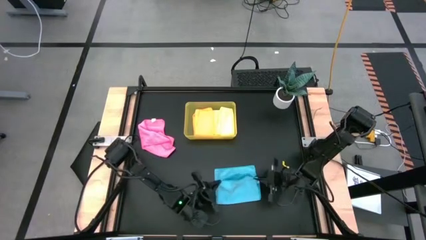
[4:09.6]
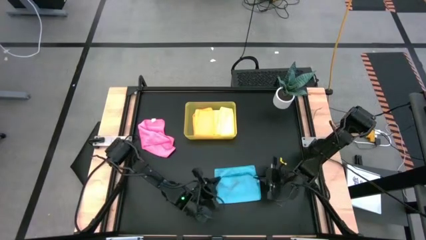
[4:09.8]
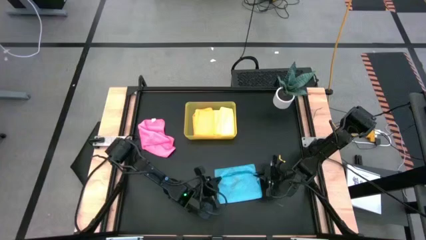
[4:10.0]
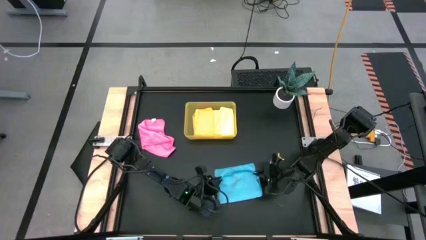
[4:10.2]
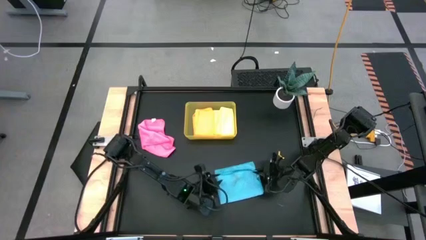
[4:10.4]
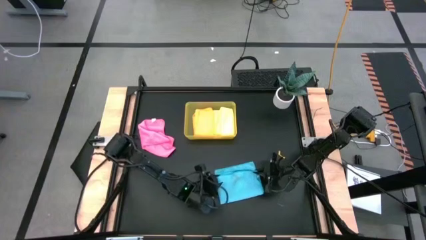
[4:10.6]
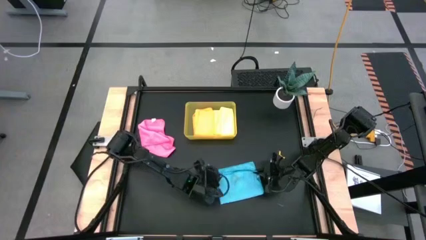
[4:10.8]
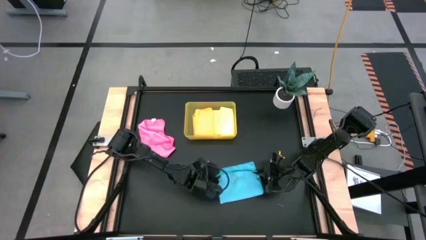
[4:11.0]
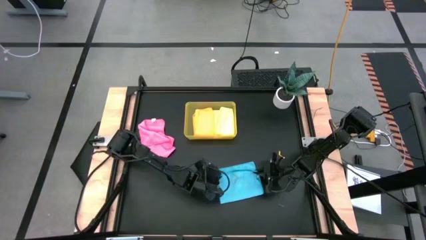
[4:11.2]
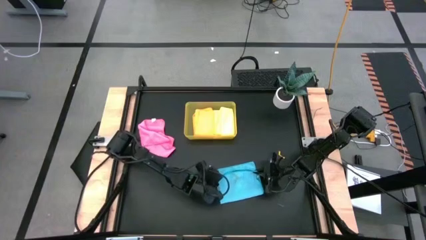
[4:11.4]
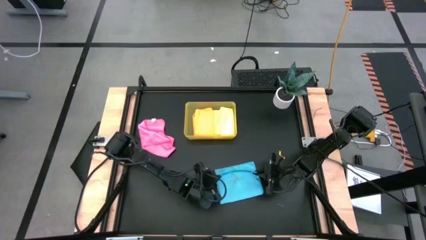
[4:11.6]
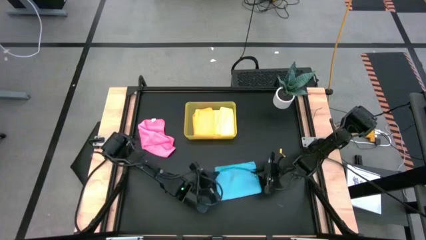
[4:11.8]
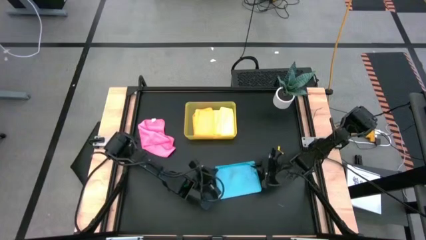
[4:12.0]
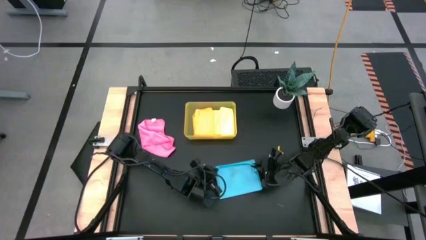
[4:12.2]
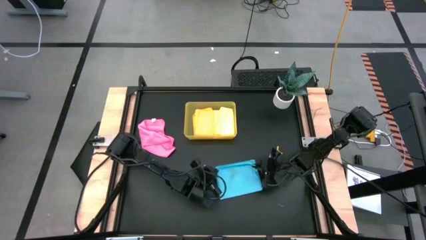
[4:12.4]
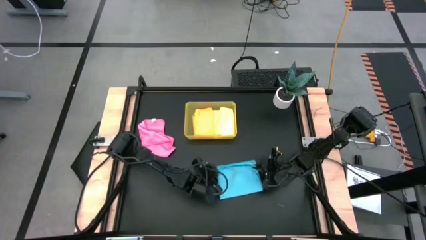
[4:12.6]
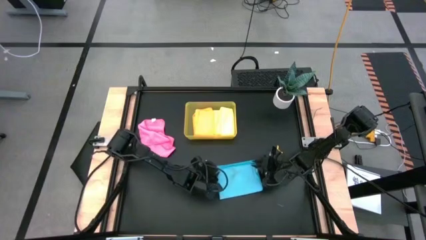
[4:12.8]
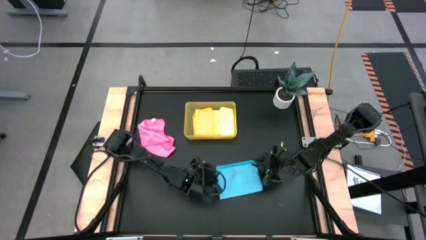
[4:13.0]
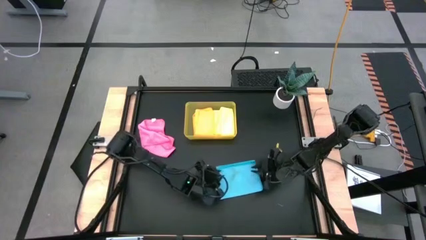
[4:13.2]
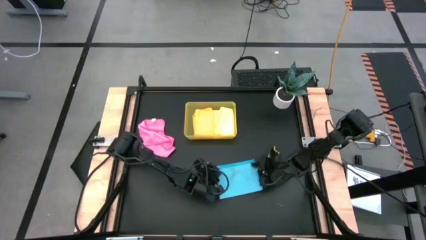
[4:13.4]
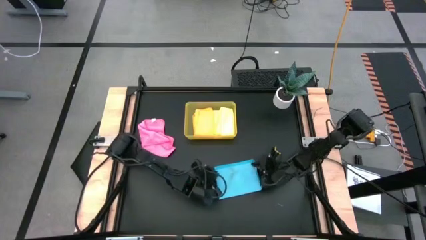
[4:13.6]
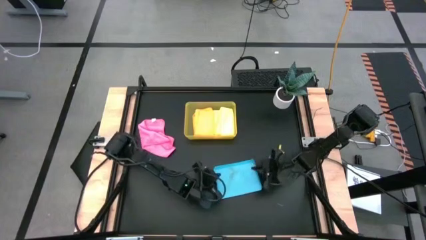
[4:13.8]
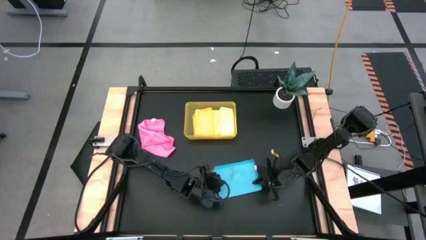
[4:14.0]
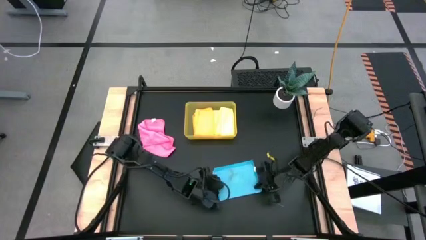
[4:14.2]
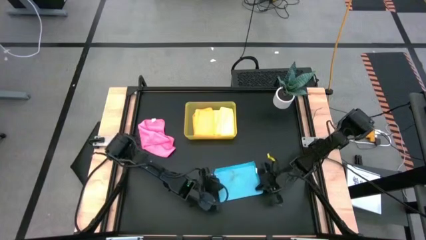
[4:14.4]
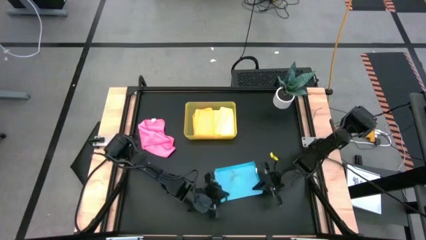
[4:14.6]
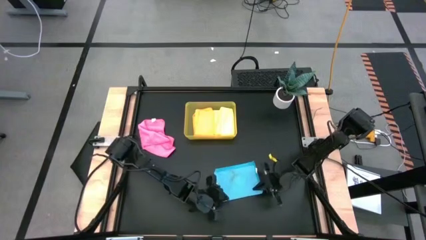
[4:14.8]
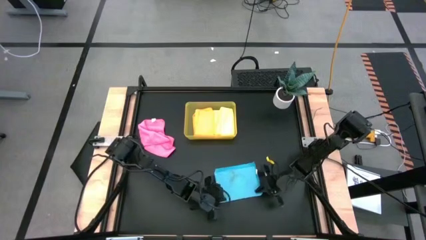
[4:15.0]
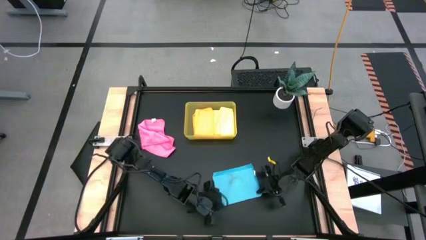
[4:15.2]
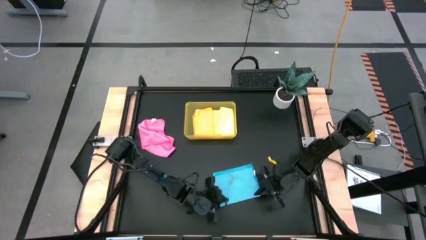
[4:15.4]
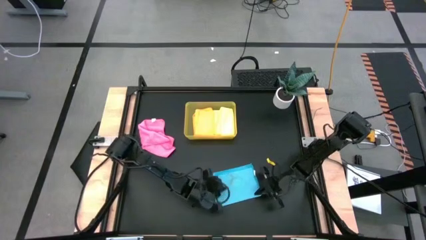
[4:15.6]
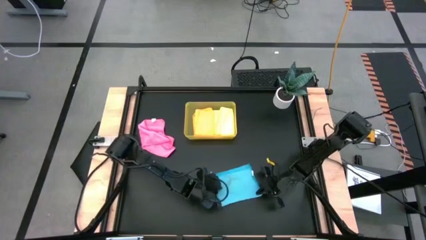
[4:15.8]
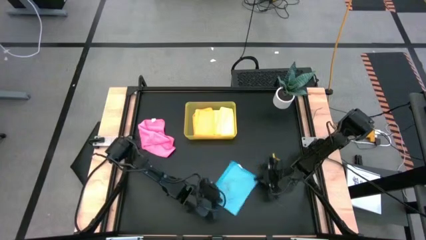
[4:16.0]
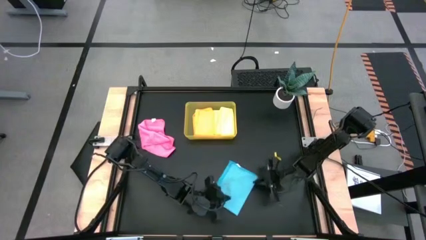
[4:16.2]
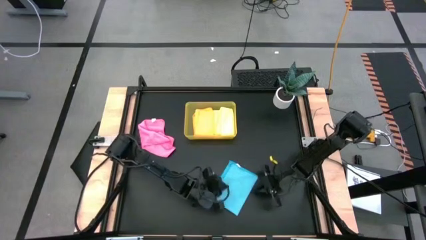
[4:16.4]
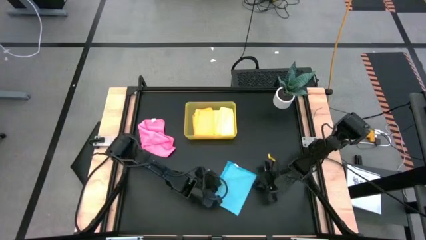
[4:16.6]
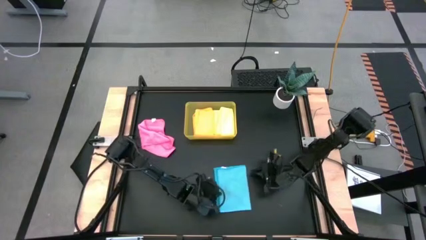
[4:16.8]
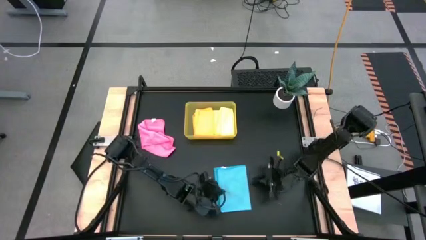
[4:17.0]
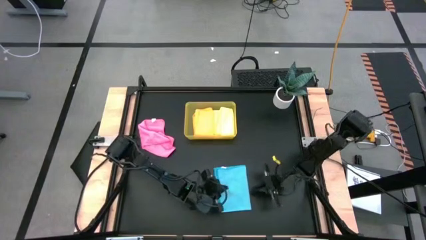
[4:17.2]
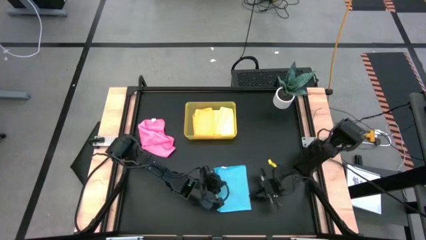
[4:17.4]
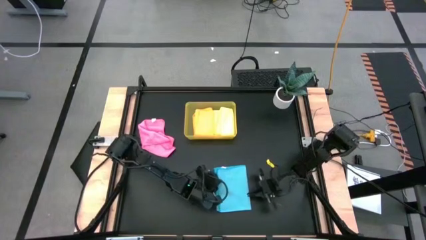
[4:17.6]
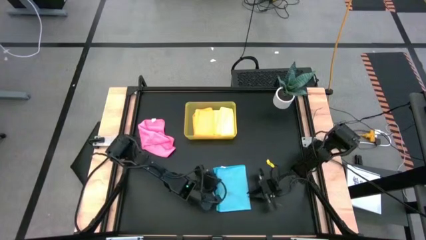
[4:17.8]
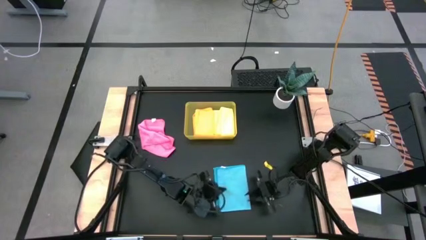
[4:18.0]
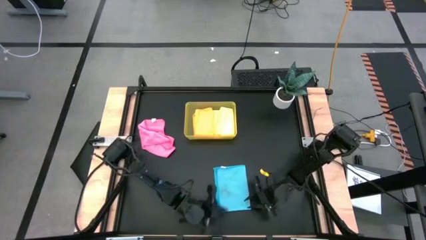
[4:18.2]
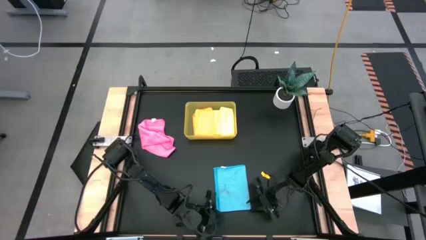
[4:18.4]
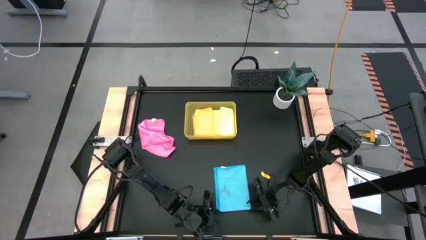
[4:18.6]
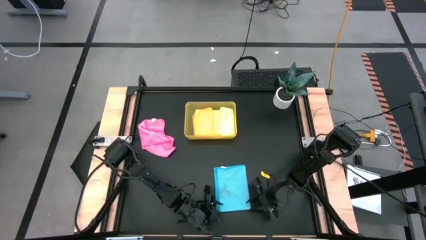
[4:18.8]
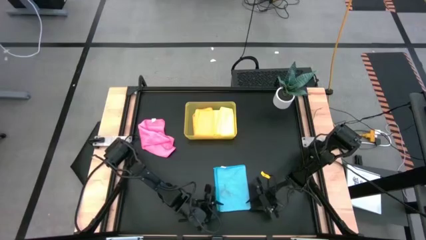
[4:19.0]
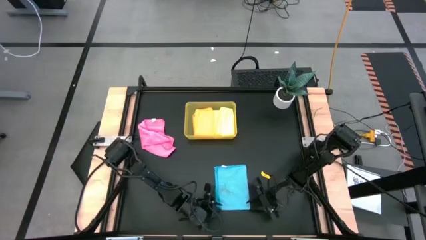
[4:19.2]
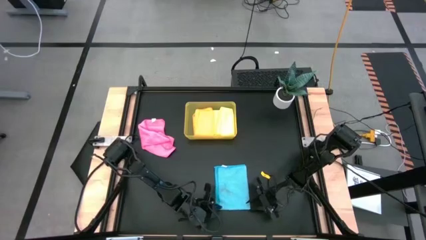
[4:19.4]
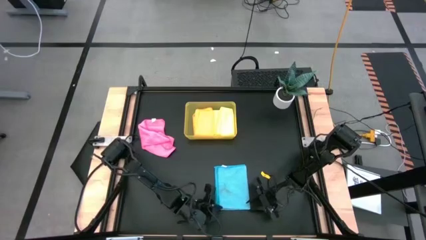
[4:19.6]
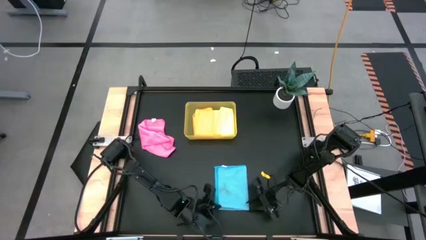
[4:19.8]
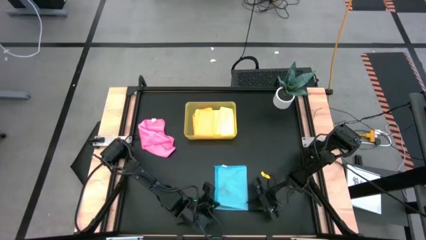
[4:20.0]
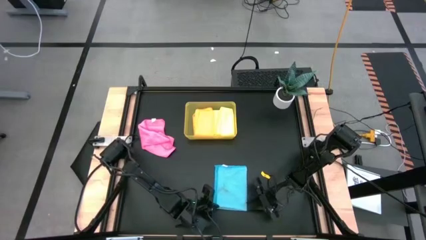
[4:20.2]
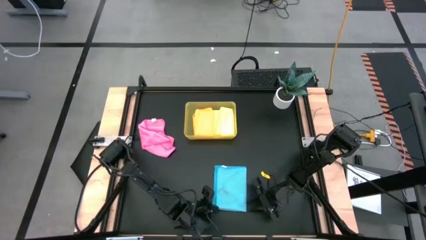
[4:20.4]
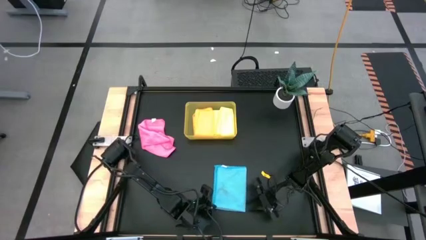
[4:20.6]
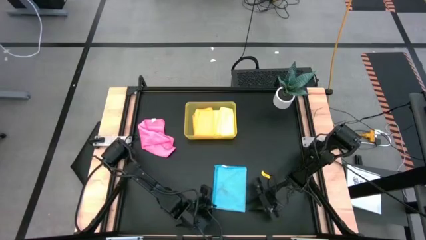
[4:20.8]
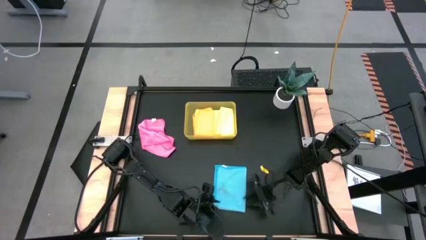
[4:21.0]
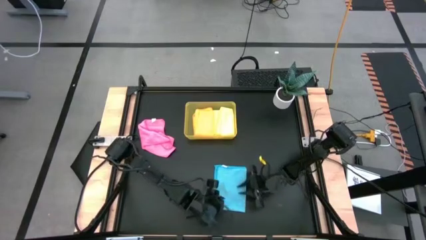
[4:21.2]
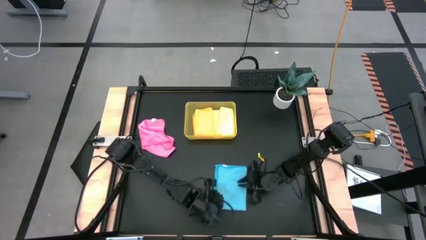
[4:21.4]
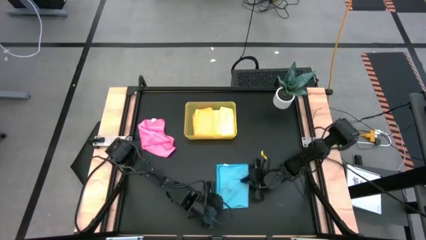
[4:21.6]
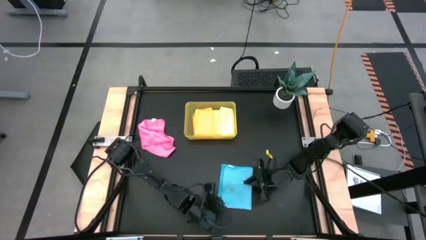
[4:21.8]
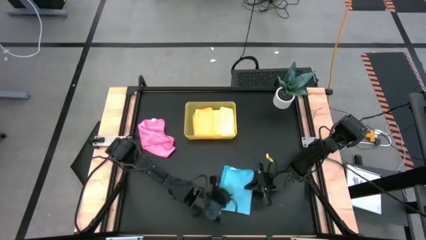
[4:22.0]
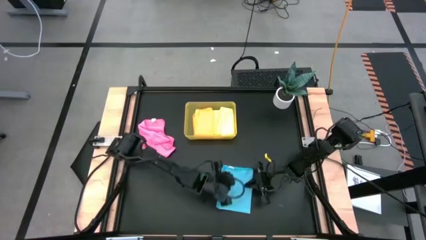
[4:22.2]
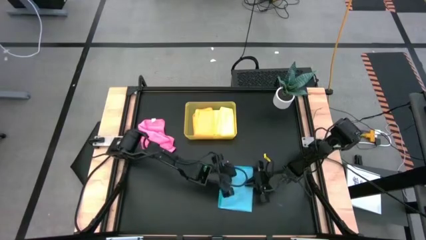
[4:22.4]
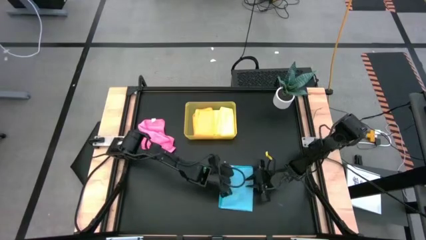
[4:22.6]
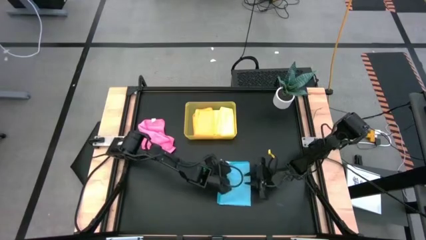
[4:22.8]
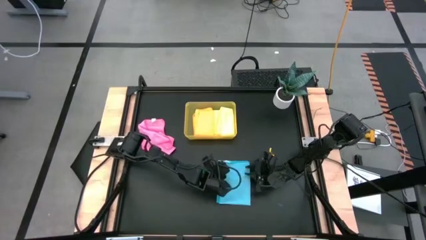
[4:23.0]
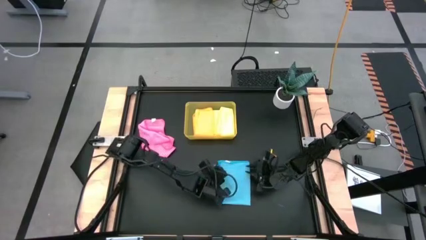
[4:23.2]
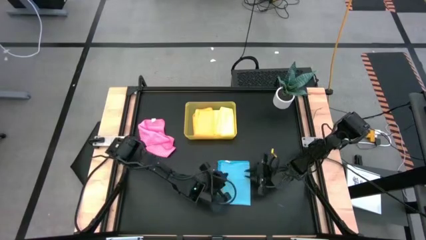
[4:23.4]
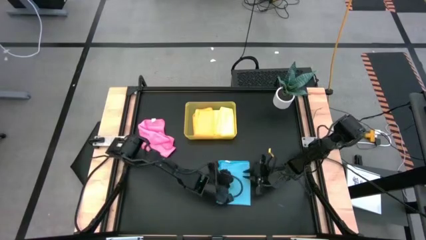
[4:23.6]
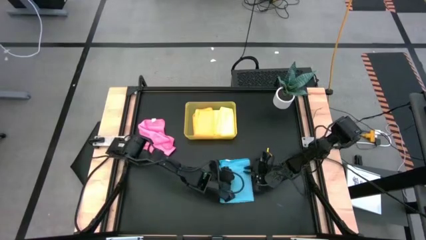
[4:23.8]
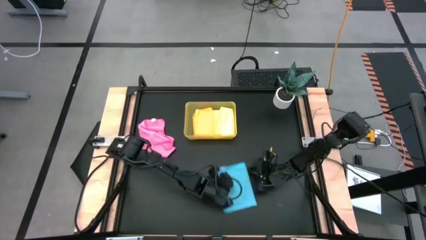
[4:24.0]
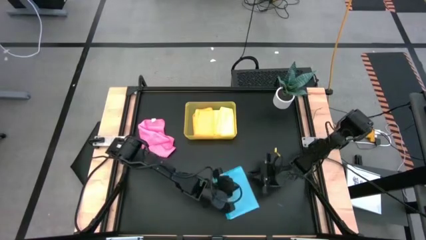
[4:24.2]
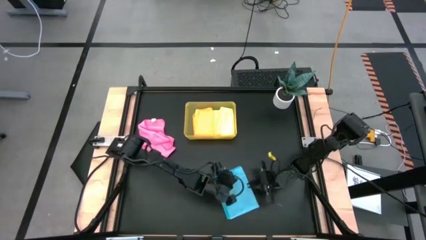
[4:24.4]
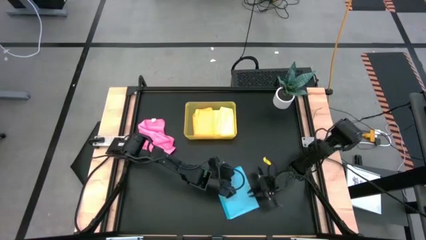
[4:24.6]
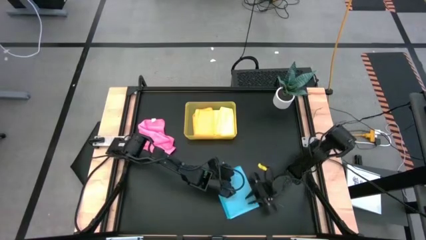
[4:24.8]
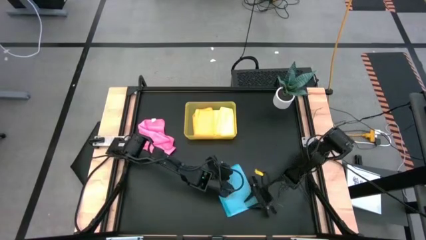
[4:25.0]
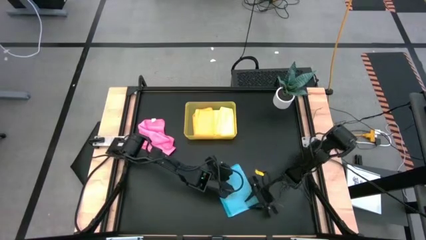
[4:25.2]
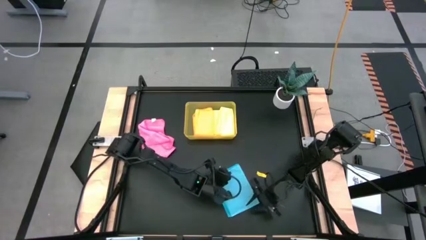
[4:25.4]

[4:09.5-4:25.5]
Task: Fold microfiber towels
Fold the blue microfiber cloth
